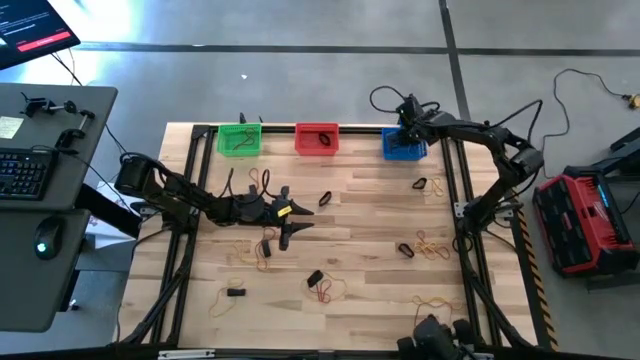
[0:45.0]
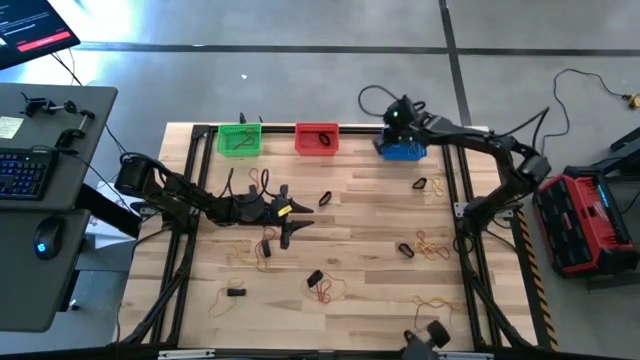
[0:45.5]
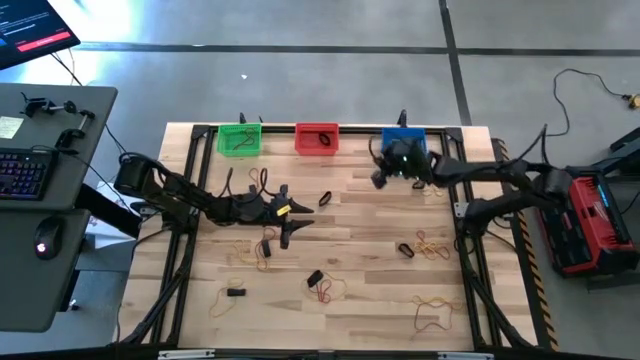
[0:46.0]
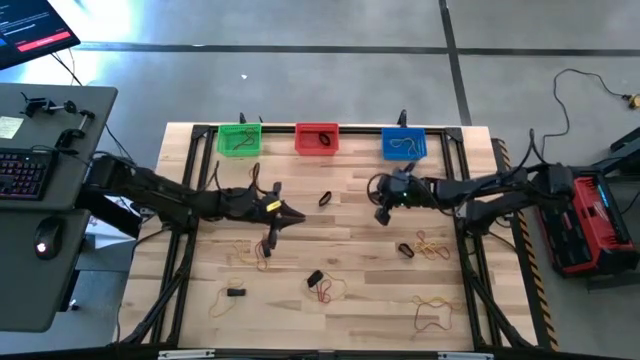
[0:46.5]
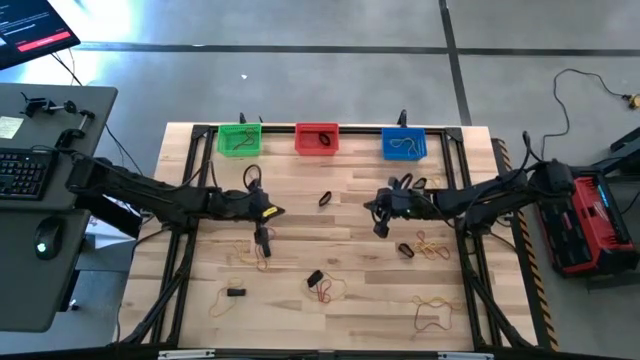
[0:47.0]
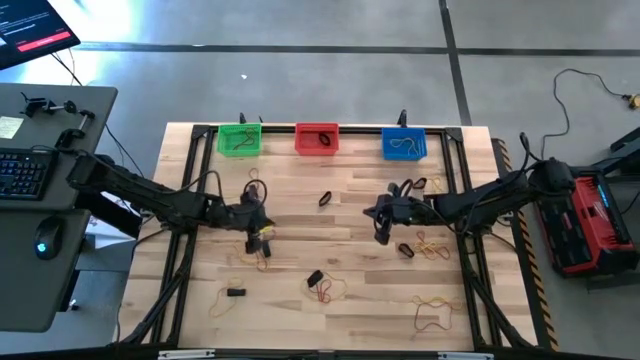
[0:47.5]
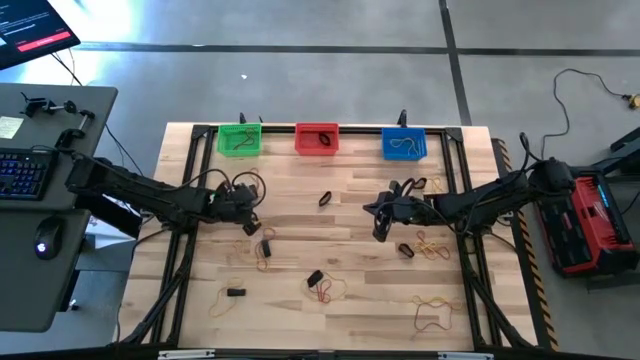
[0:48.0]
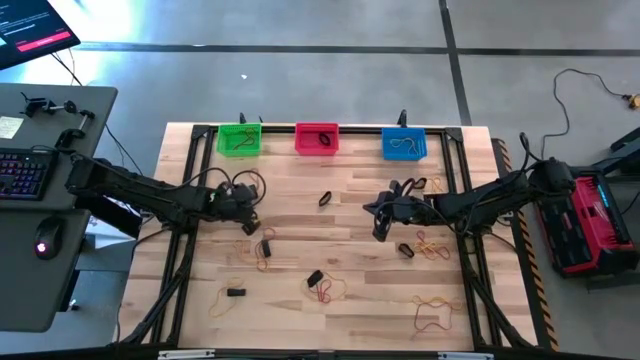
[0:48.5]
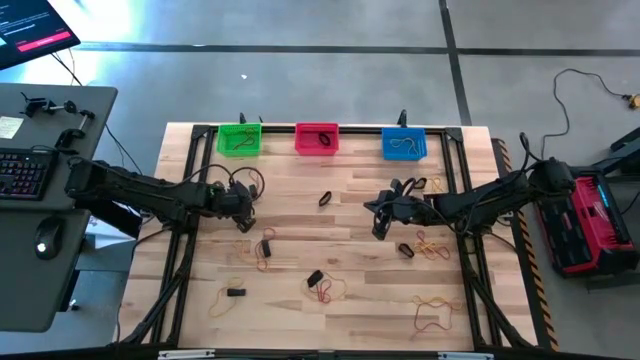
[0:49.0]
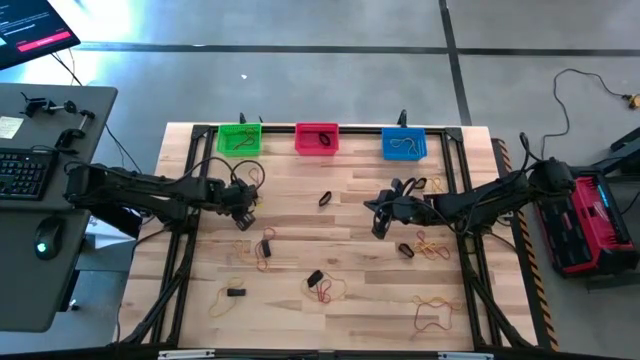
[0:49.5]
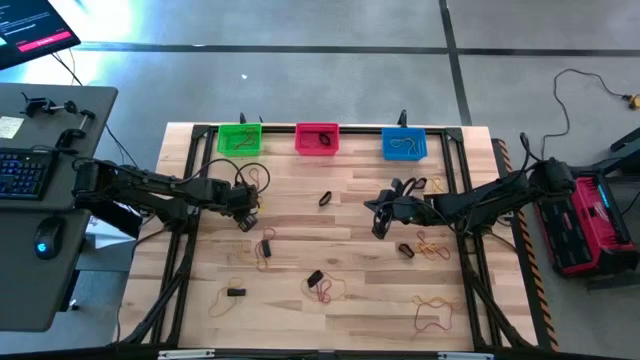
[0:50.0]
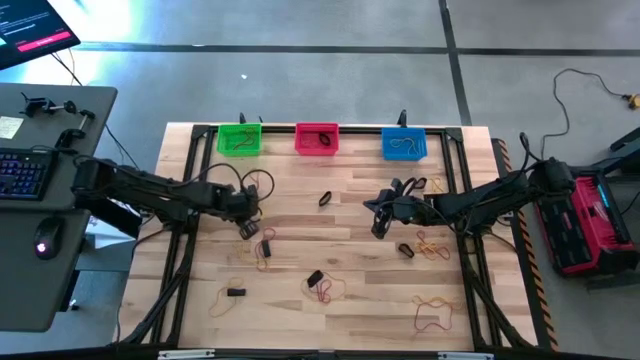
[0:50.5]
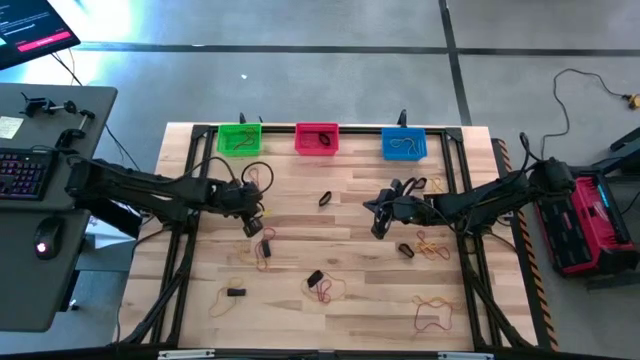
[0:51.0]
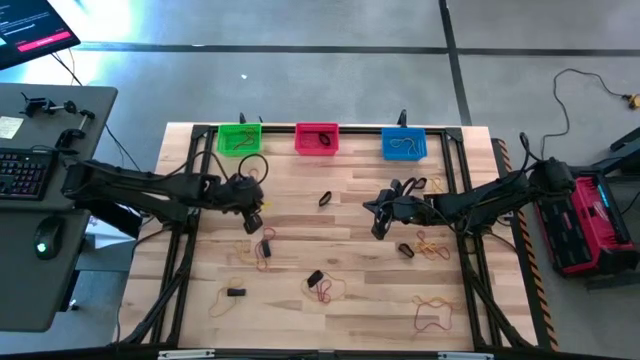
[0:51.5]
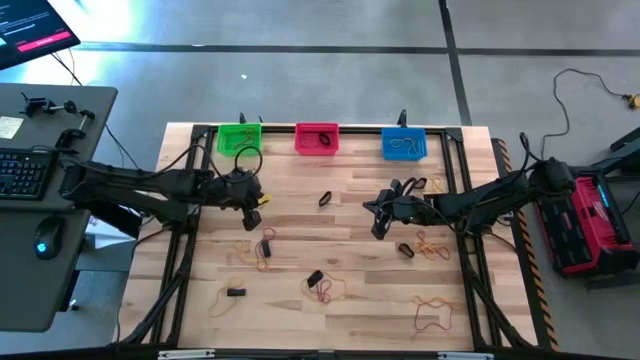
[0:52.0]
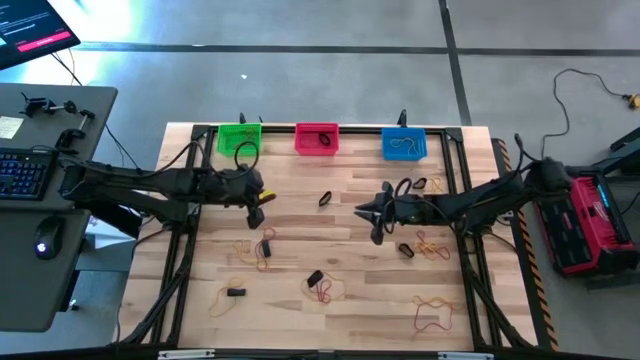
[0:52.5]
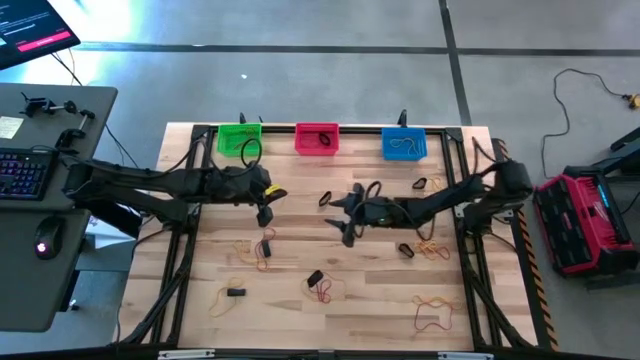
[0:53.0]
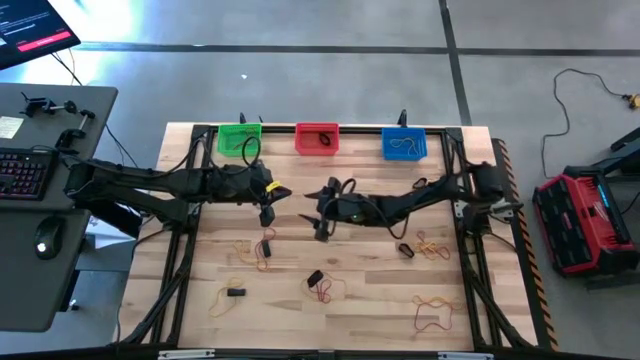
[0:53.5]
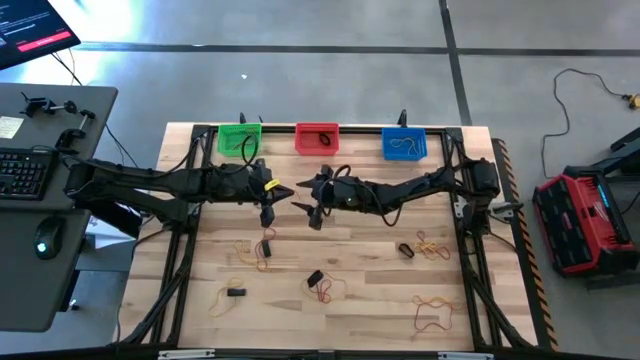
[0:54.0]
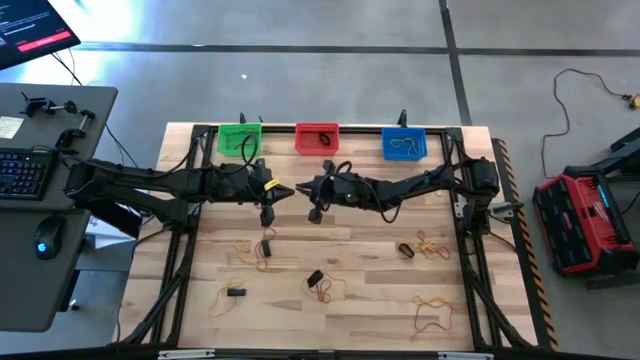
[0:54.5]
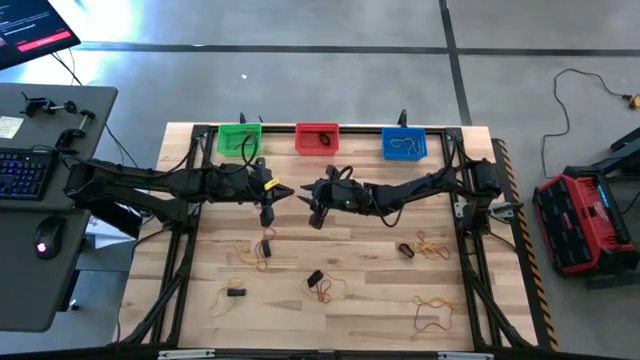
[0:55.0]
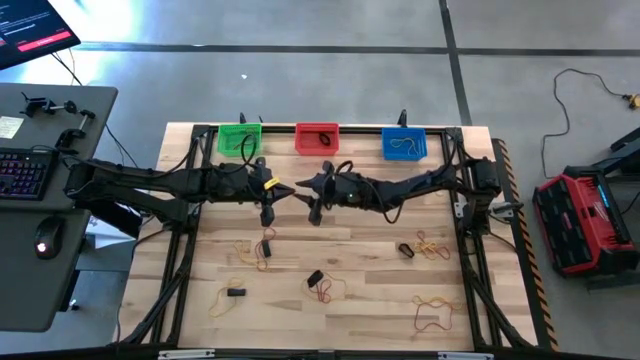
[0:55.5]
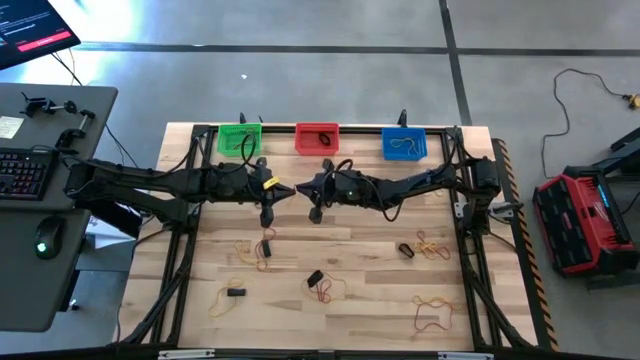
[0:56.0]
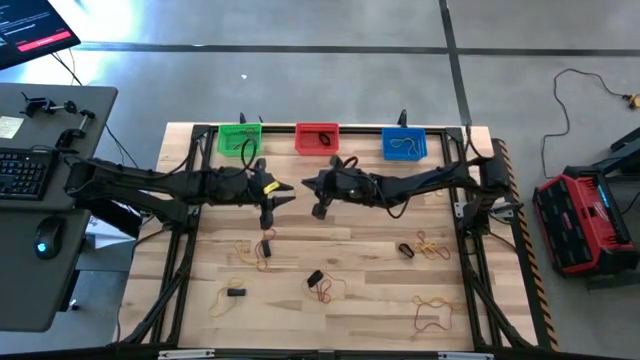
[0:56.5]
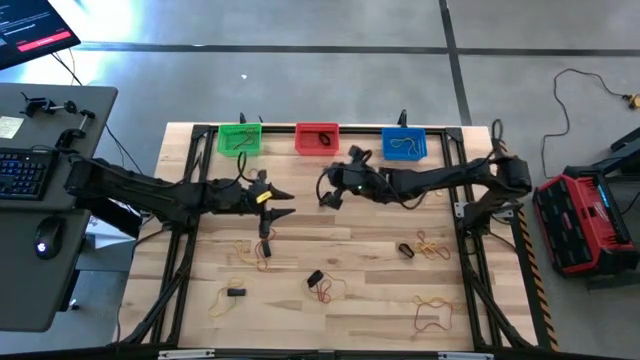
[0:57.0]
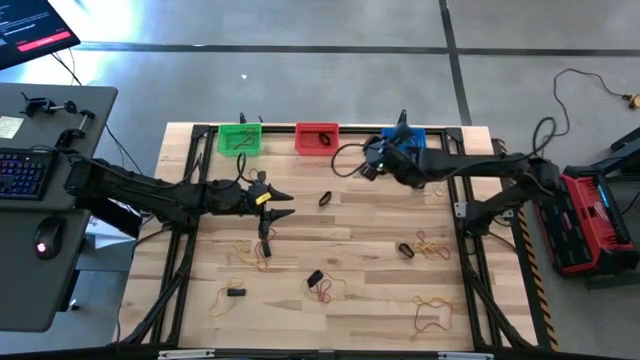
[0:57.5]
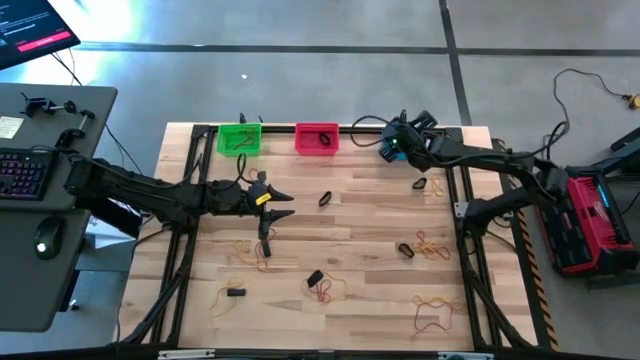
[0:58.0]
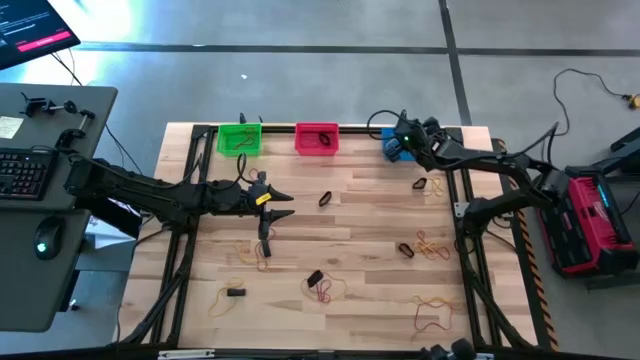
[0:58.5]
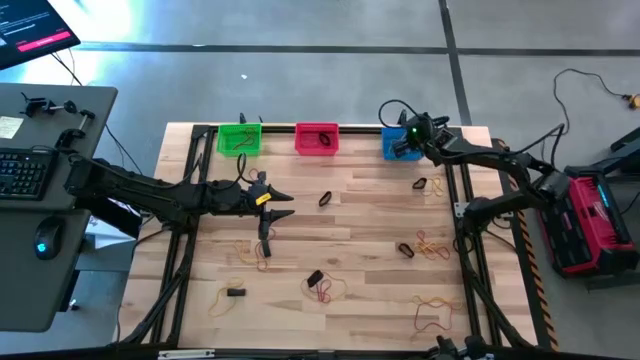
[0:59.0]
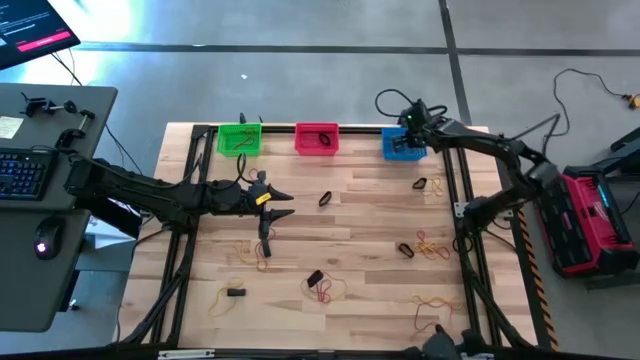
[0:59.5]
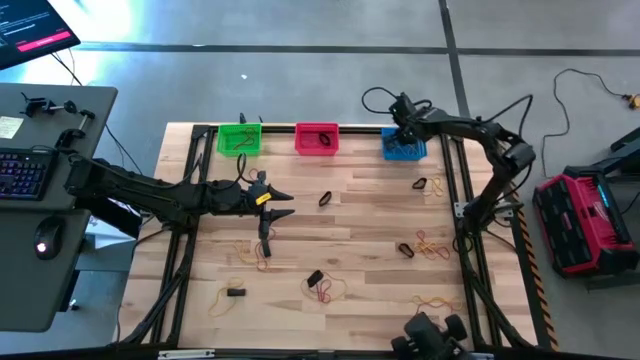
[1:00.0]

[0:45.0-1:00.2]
Task: Sort rubber bands into baskets
Put the yellow rubber band into the blue bin

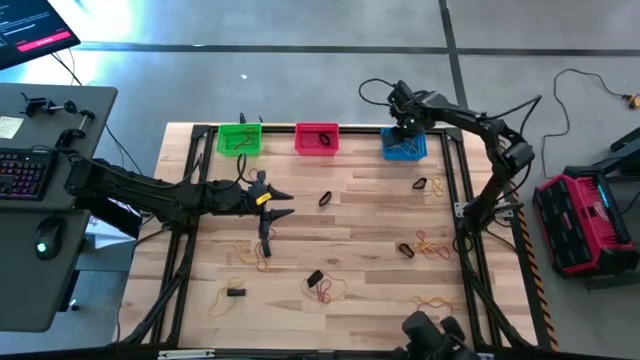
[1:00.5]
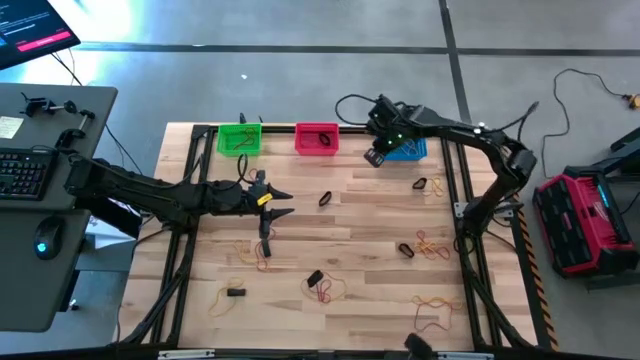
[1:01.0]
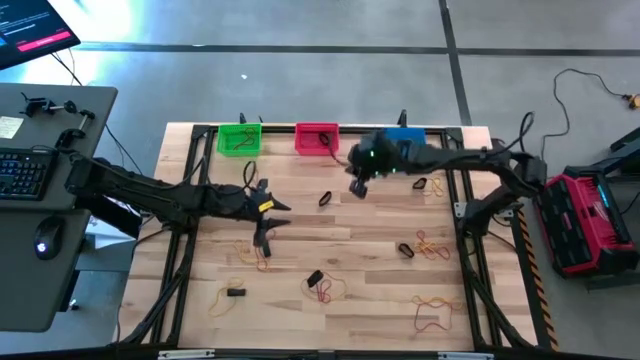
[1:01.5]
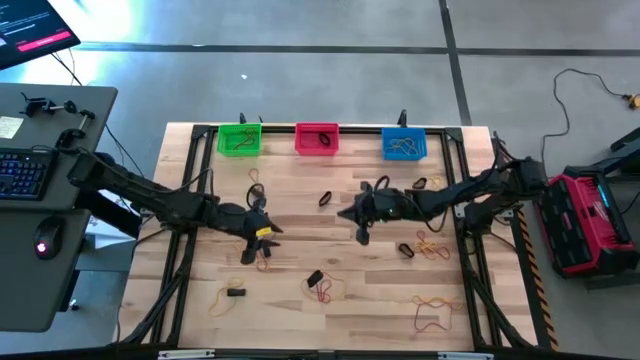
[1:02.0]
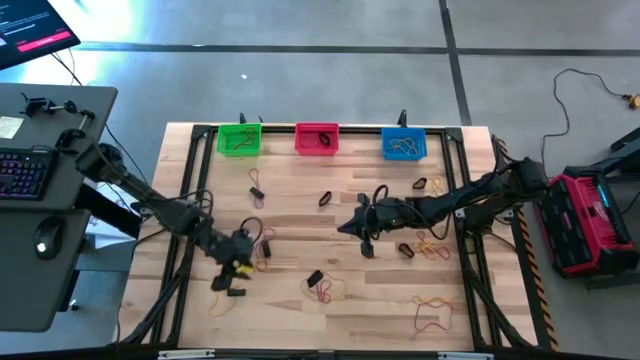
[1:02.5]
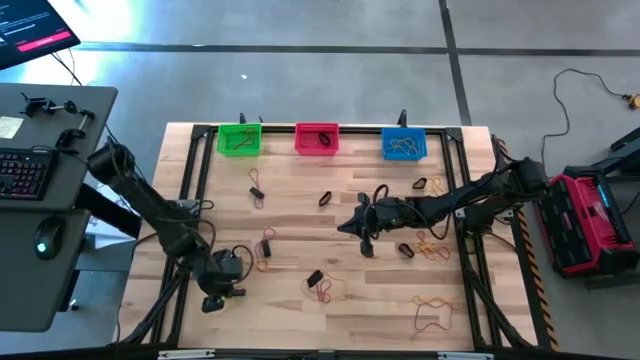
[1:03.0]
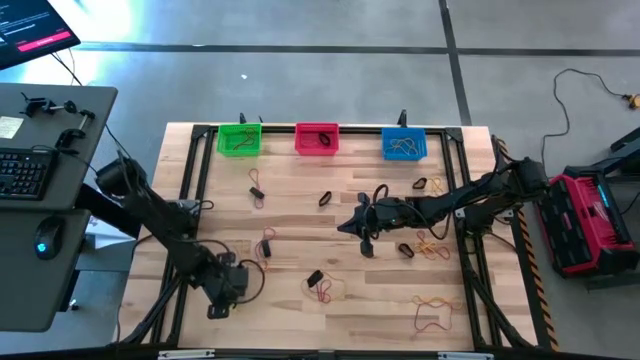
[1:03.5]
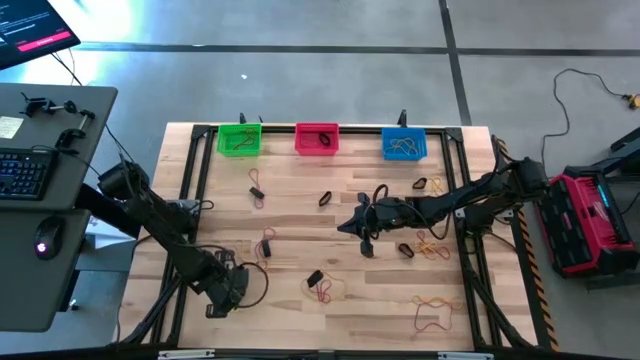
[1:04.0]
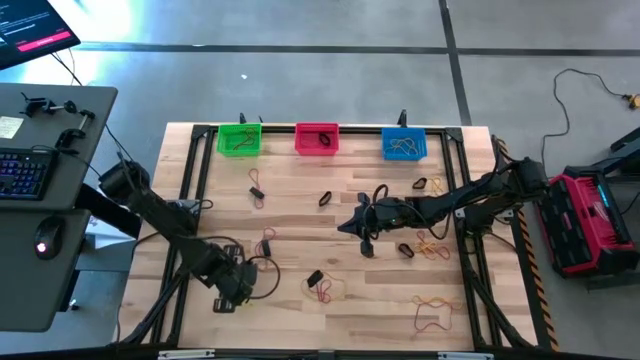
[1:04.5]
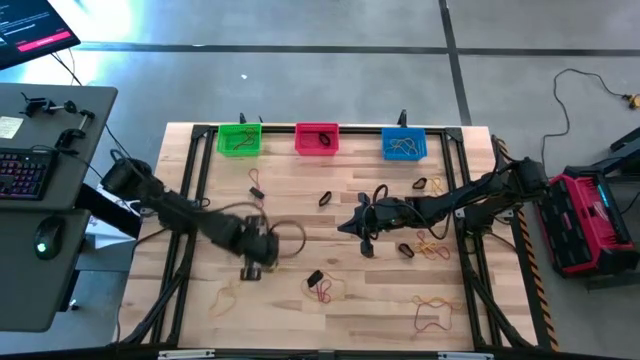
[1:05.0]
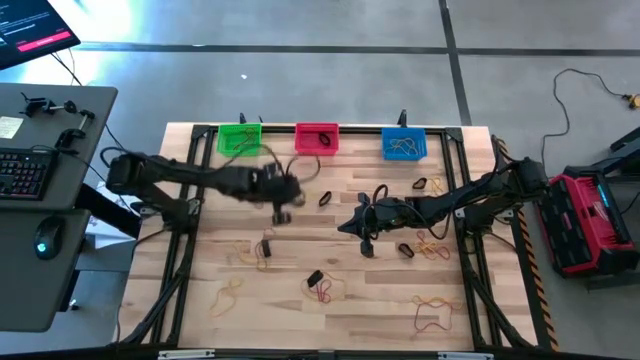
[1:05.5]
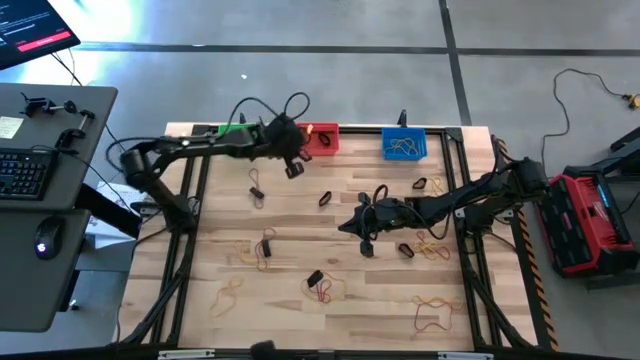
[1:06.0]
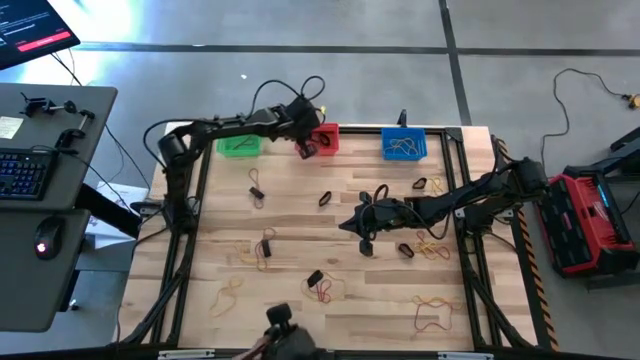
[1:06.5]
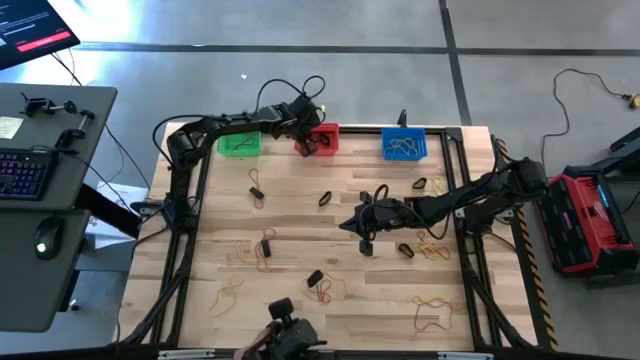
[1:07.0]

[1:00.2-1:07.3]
Put the black rubber band into the red bin
